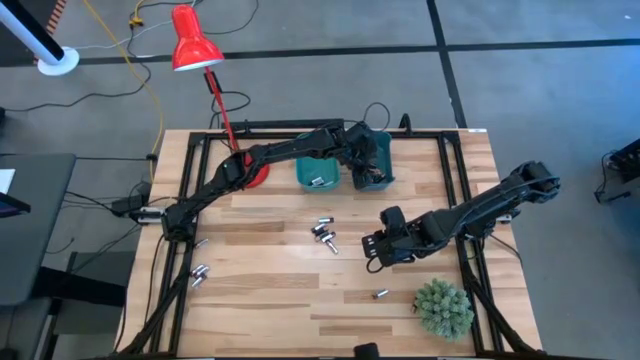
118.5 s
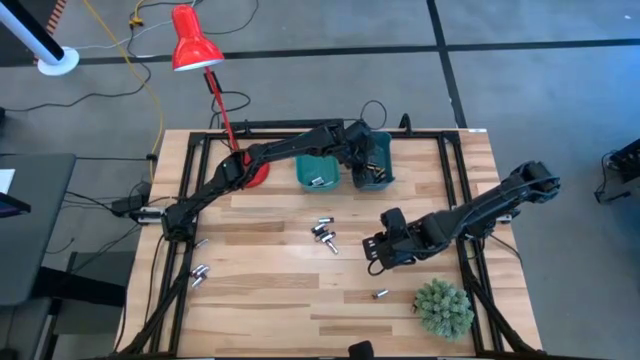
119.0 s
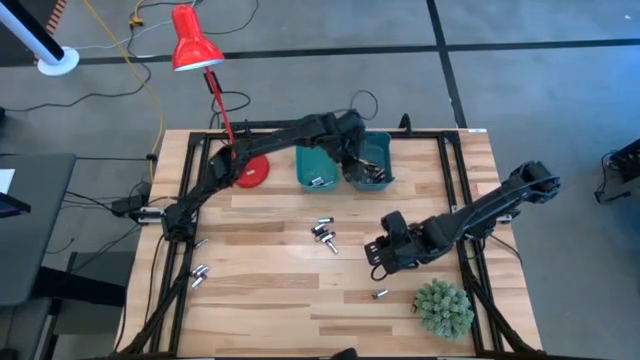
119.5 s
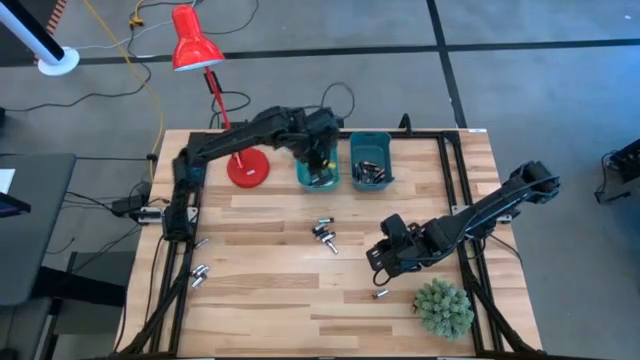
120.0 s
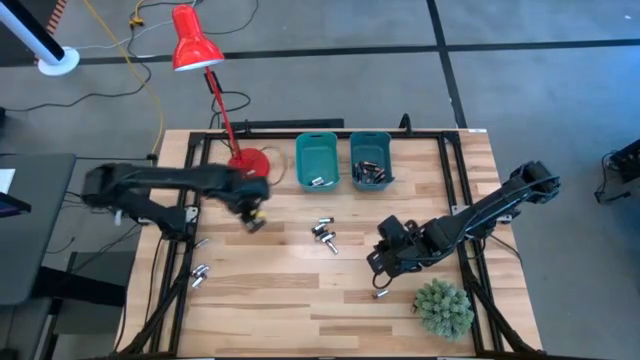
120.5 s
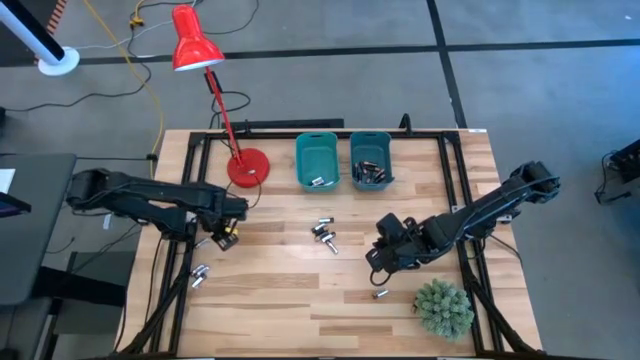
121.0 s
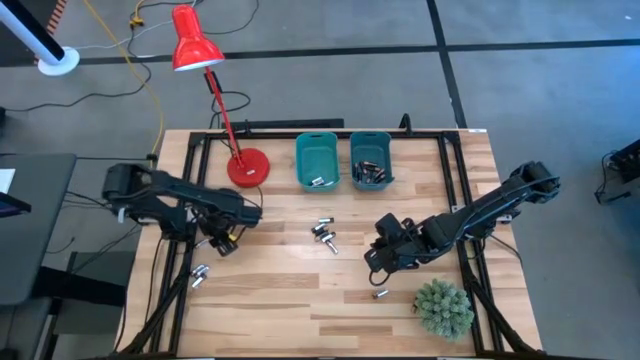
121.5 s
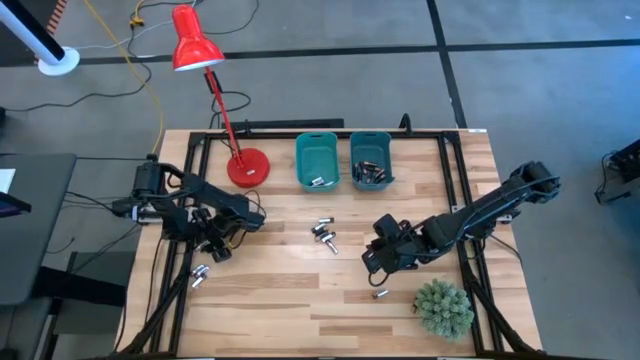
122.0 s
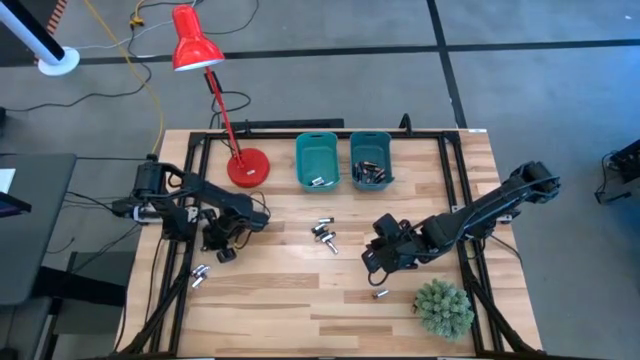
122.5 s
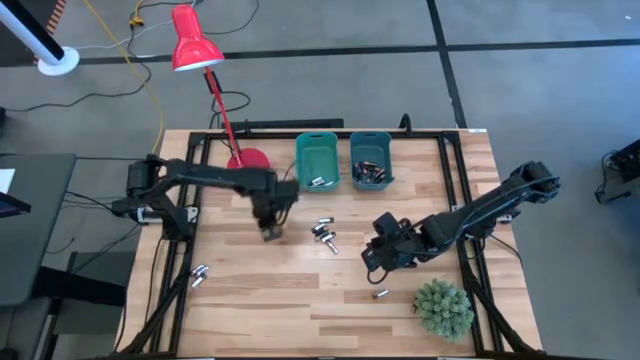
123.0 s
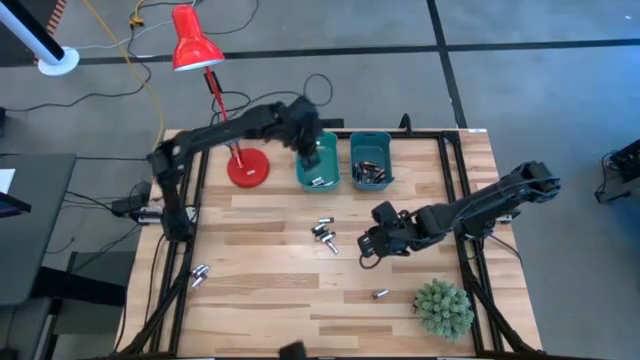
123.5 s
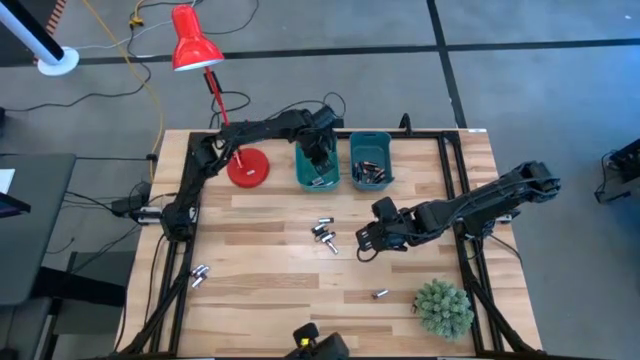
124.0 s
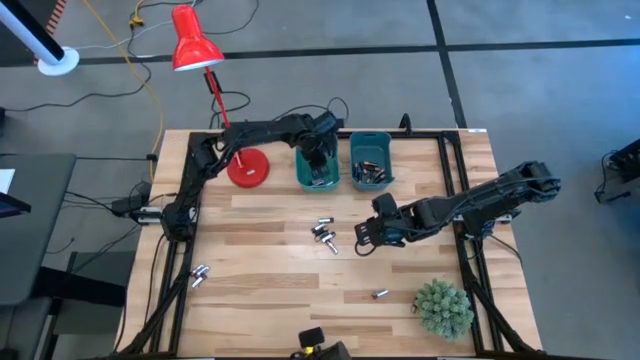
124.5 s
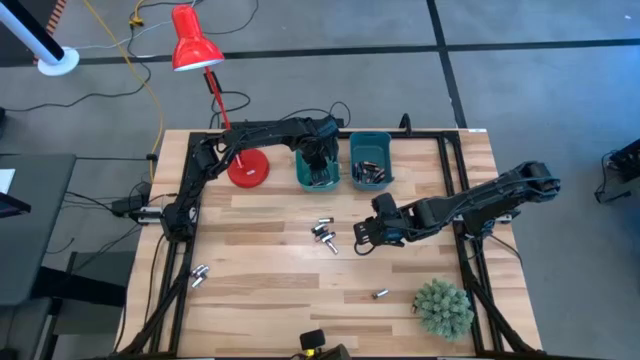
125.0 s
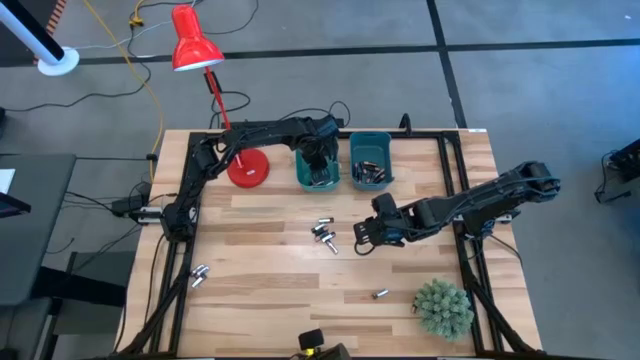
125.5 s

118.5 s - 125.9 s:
Task: Sort batteries
Put the silver battery into the green bin

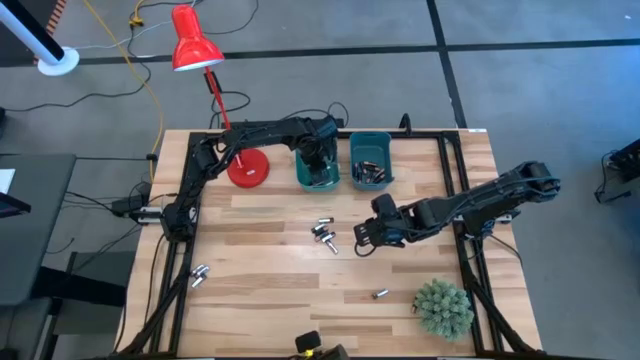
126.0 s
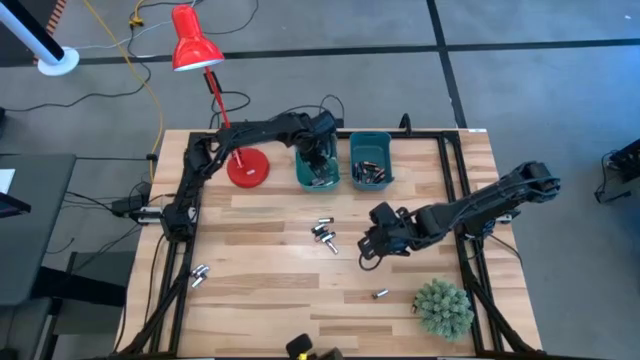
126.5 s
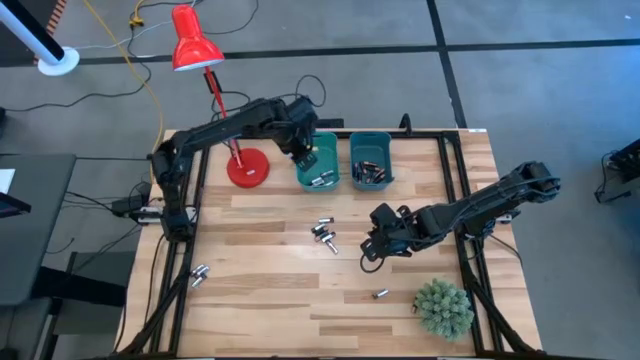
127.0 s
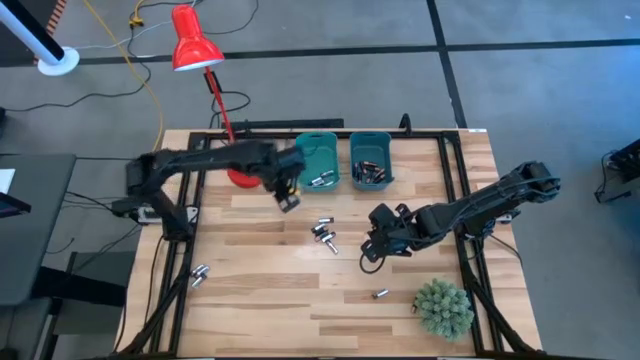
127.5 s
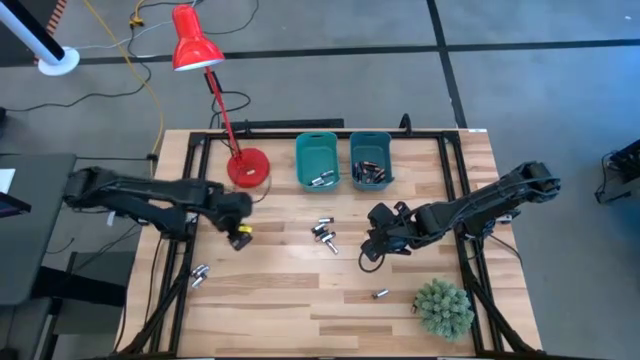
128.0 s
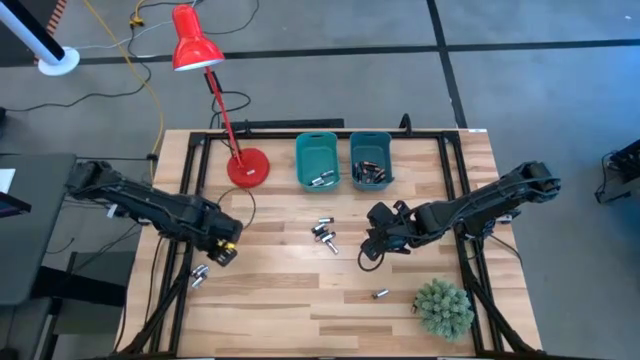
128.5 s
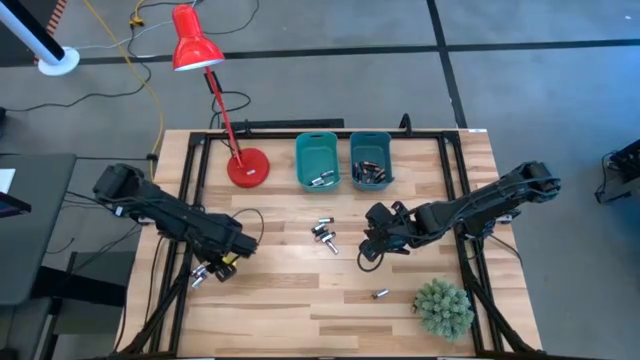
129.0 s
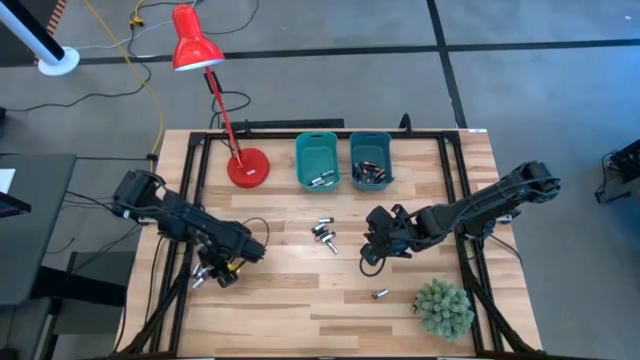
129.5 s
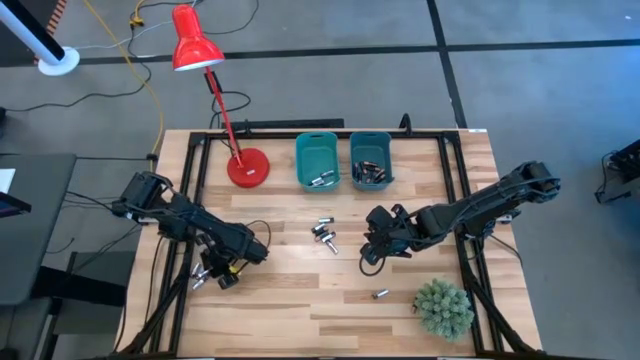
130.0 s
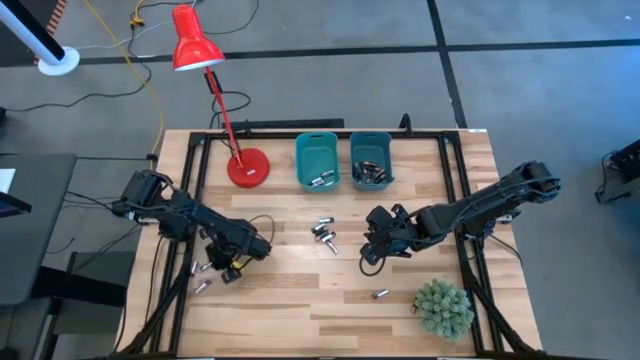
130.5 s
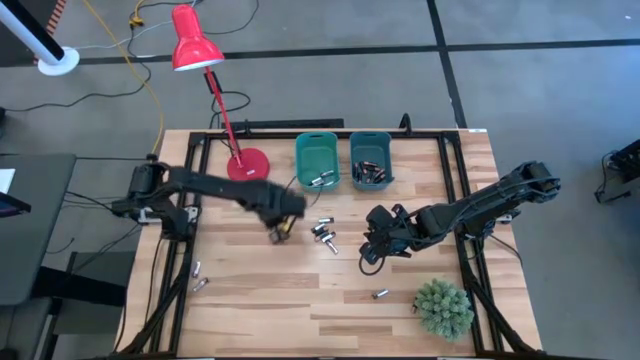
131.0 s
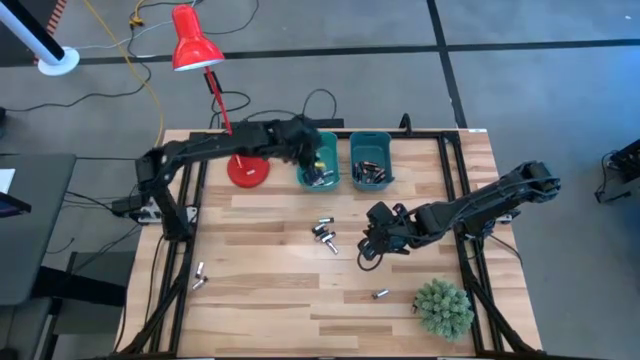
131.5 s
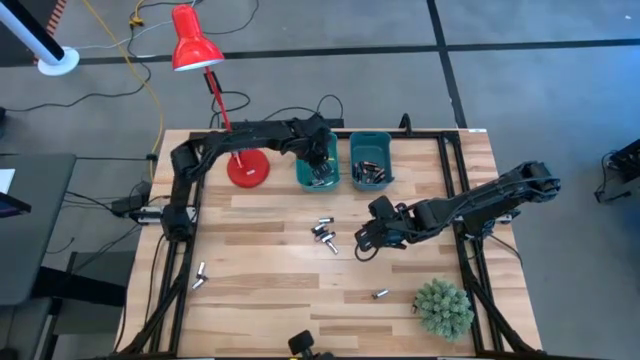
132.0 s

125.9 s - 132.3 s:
Put the silver battery into the green bin

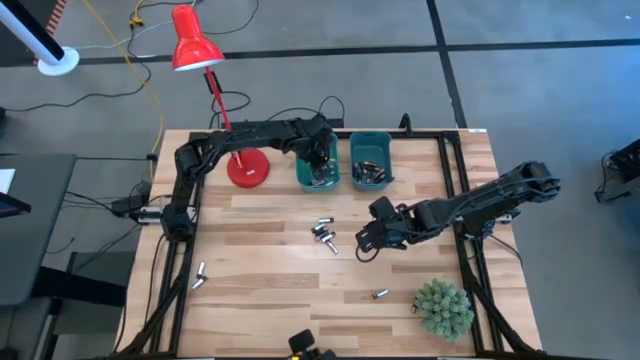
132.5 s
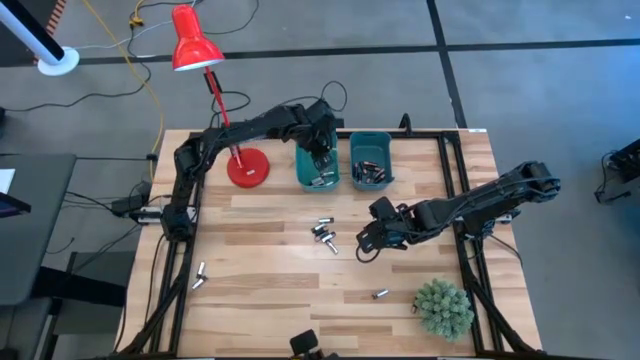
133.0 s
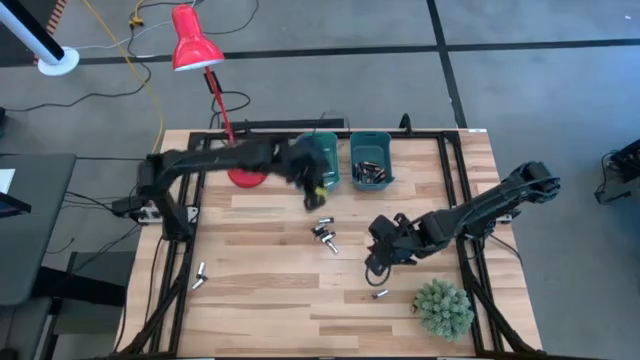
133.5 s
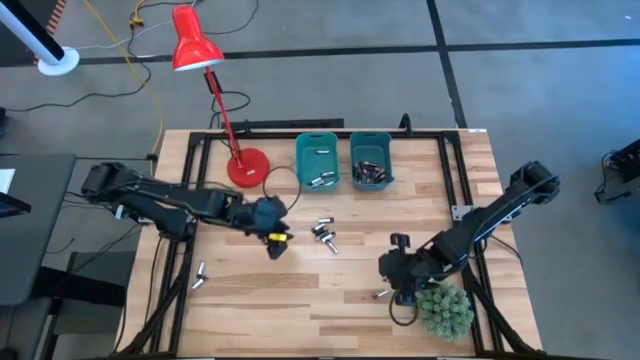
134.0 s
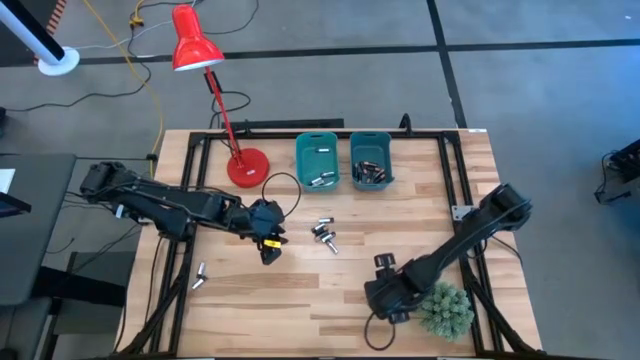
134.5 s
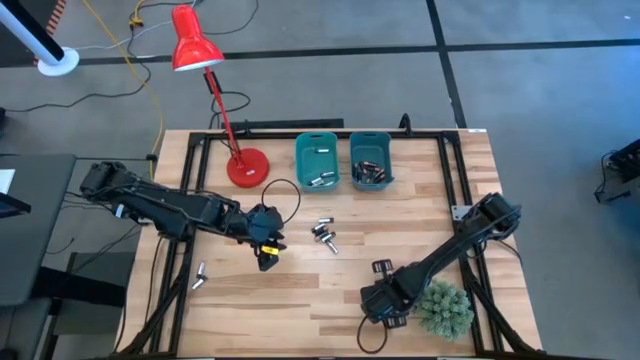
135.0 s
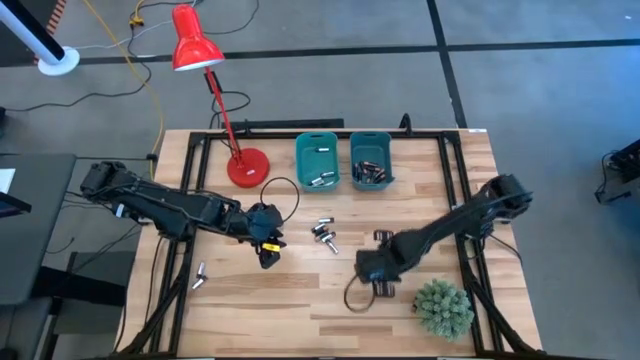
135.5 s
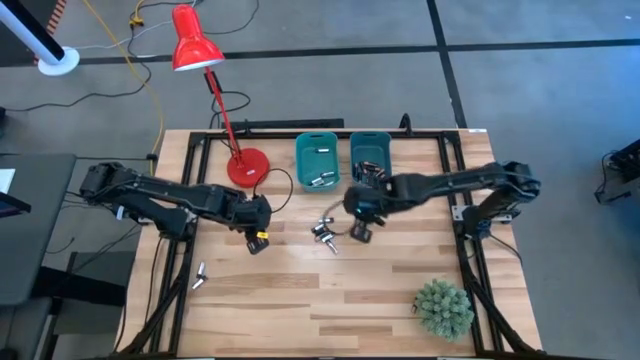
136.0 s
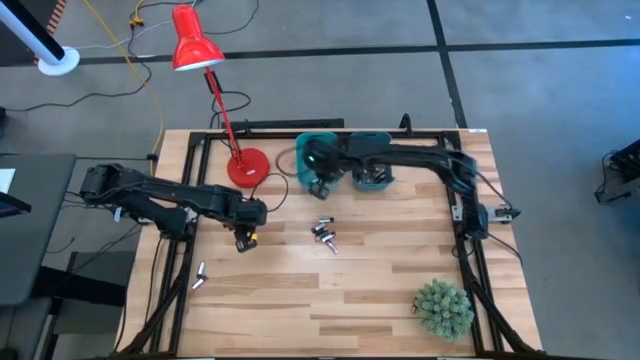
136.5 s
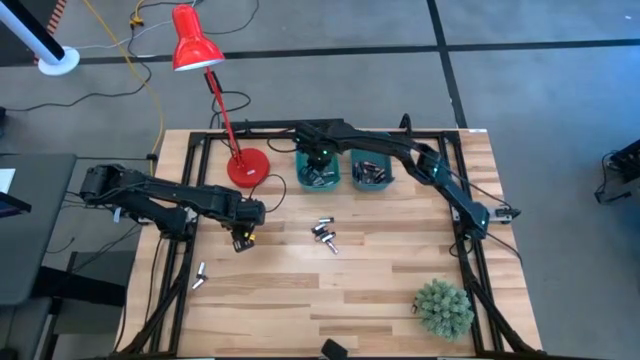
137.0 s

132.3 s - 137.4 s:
Put the silver battery into the green bin

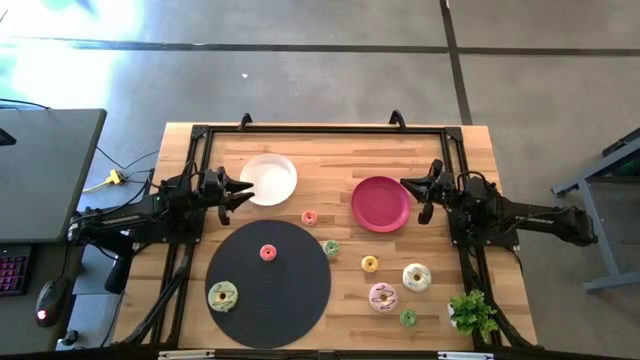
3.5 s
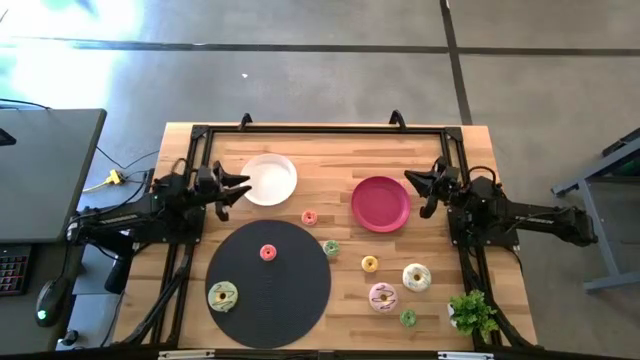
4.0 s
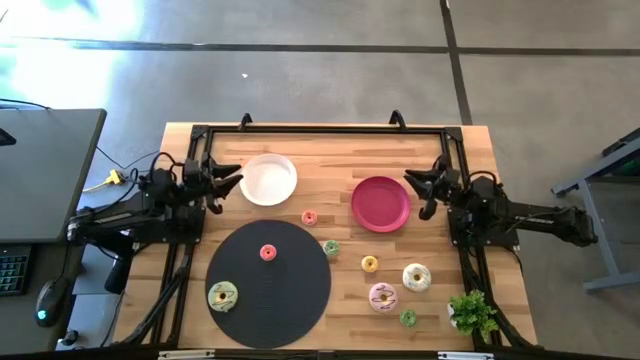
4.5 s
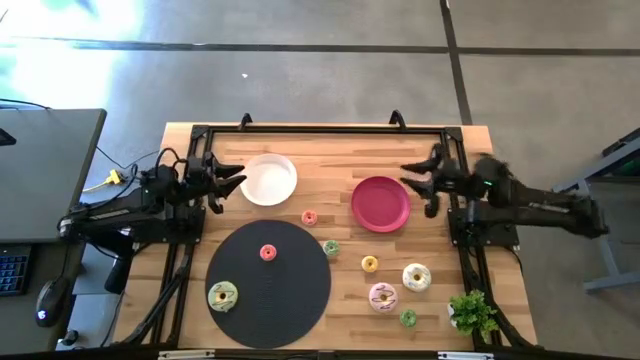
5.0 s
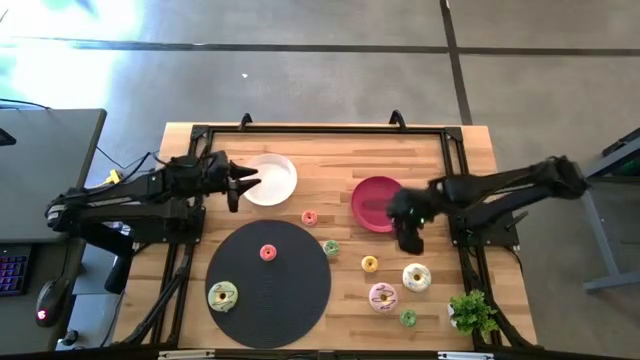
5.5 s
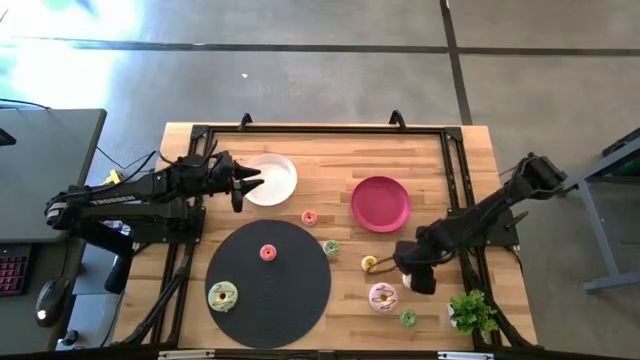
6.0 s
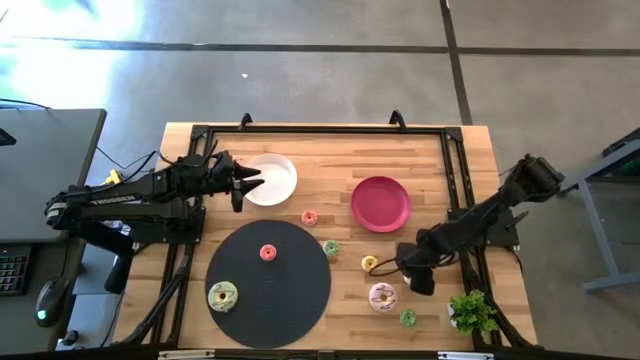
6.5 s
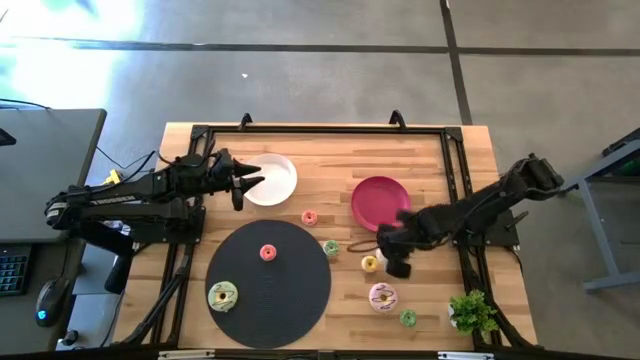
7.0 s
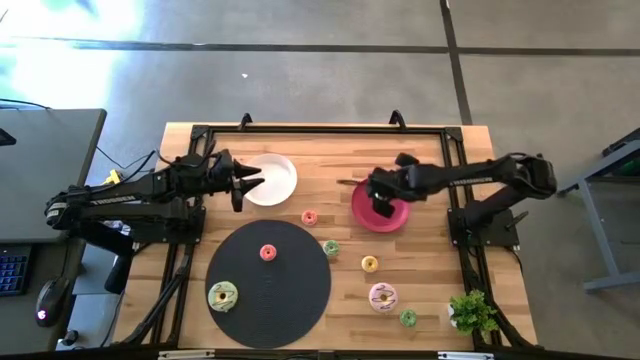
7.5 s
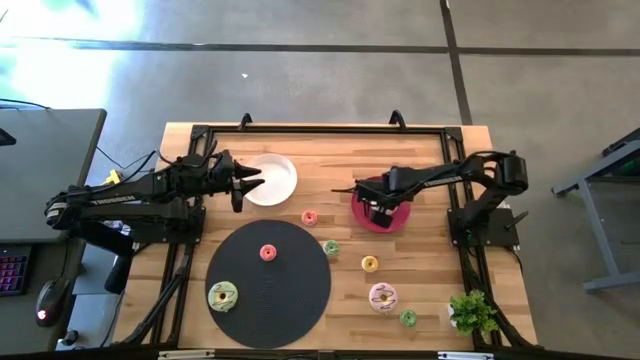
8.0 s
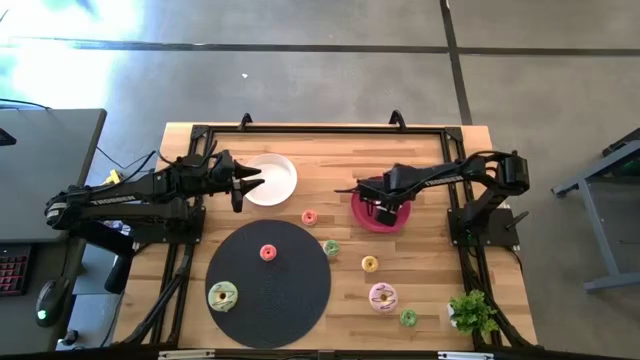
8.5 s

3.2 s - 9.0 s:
Task: Pick & Place donuts
Put the large white donut on the pink plate
